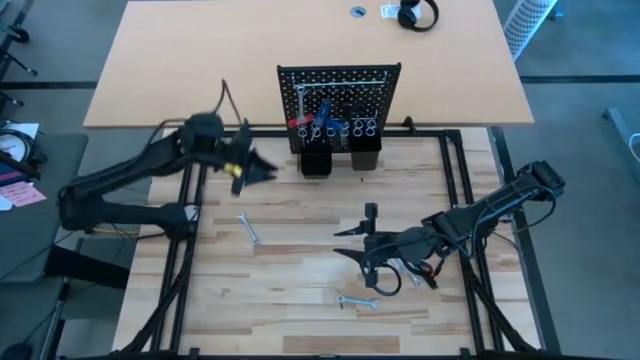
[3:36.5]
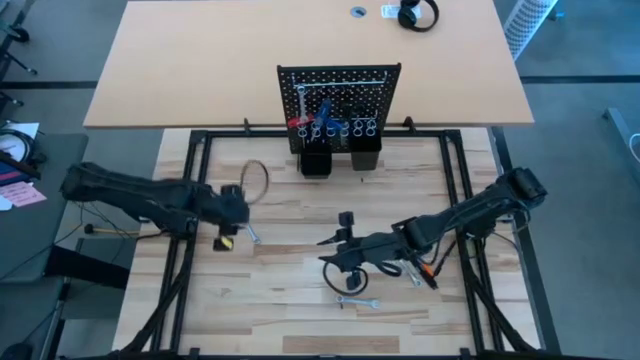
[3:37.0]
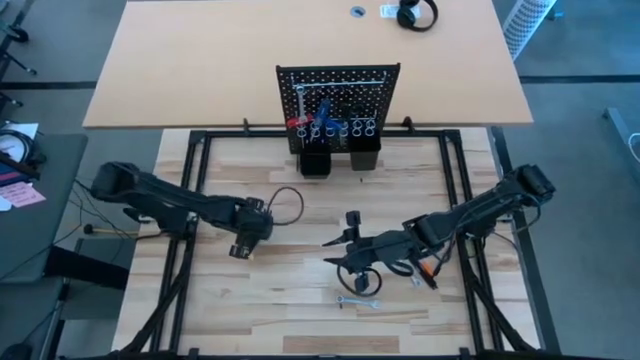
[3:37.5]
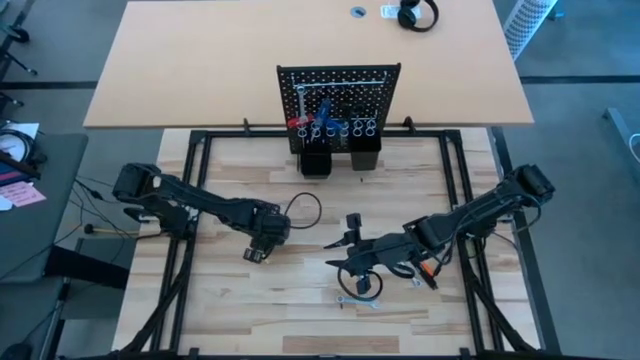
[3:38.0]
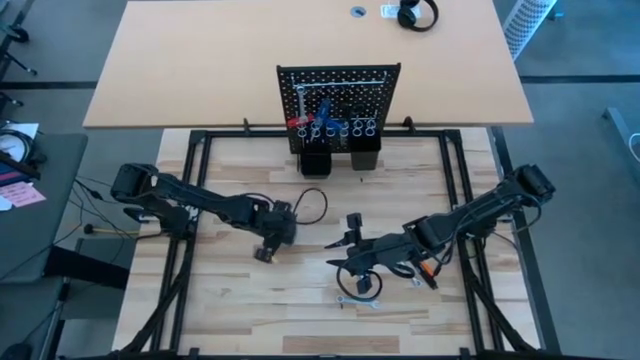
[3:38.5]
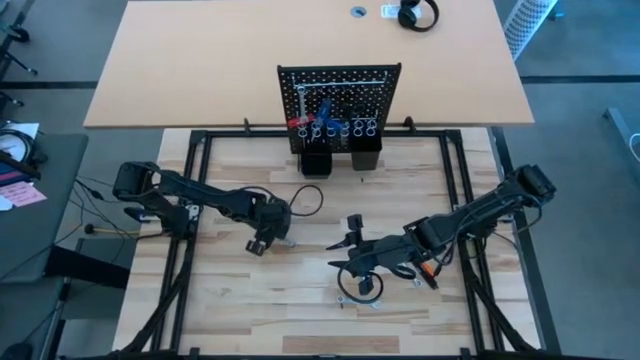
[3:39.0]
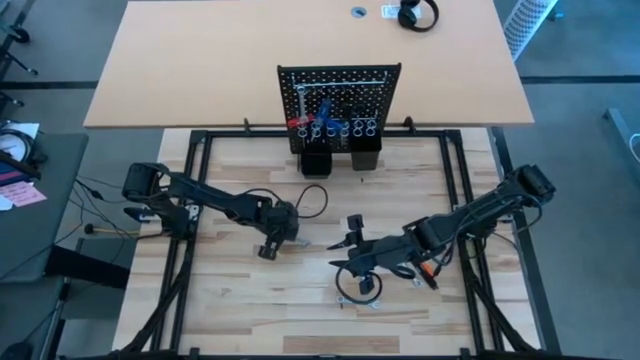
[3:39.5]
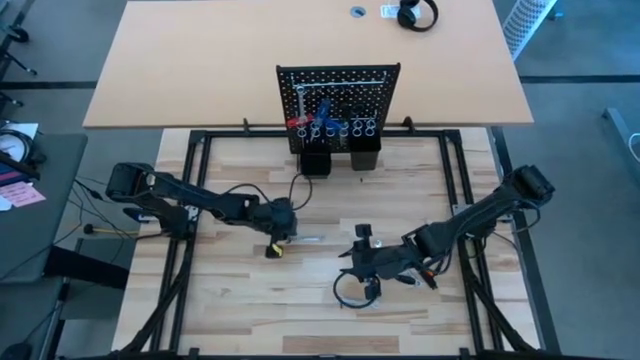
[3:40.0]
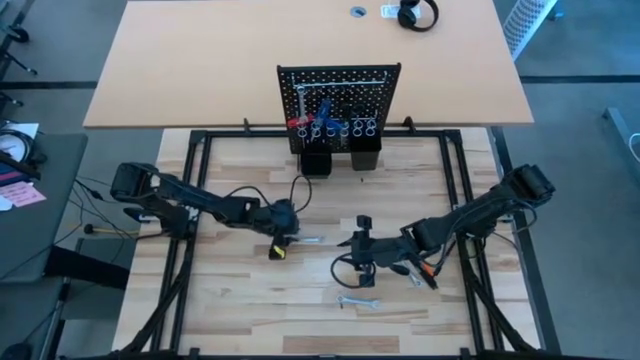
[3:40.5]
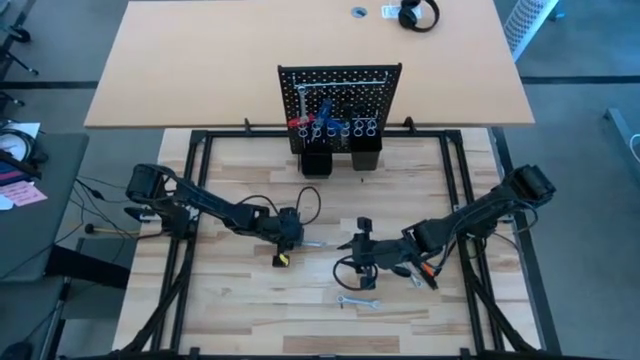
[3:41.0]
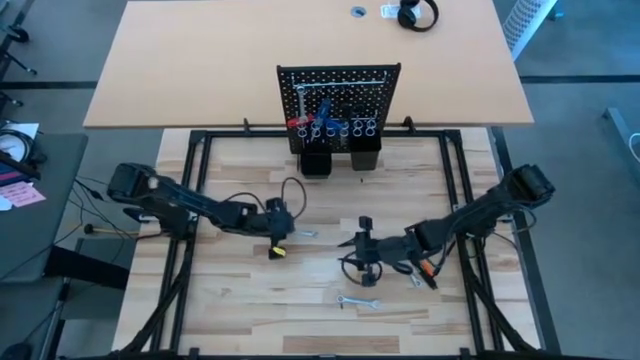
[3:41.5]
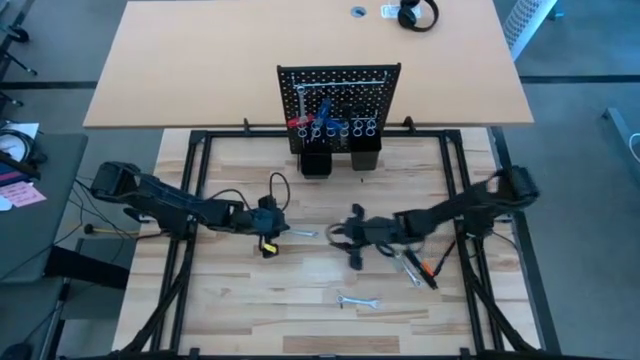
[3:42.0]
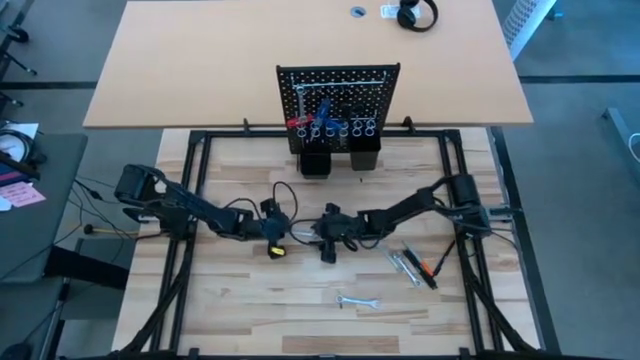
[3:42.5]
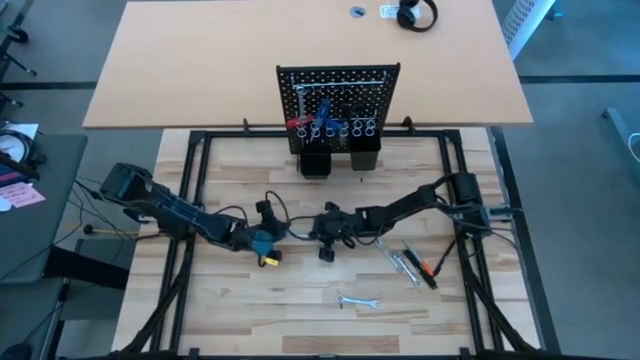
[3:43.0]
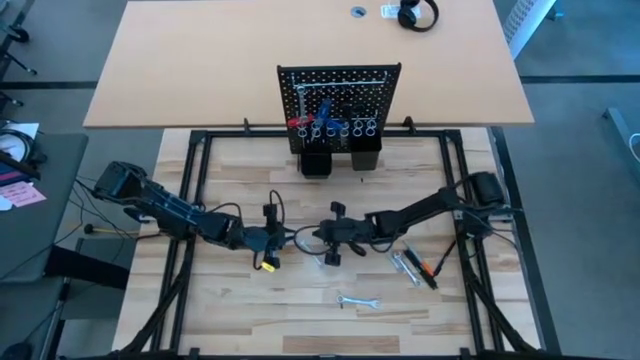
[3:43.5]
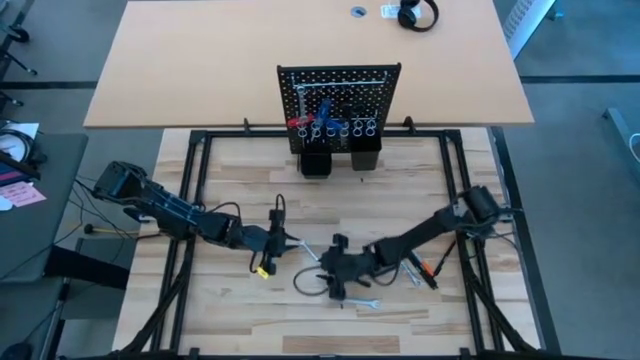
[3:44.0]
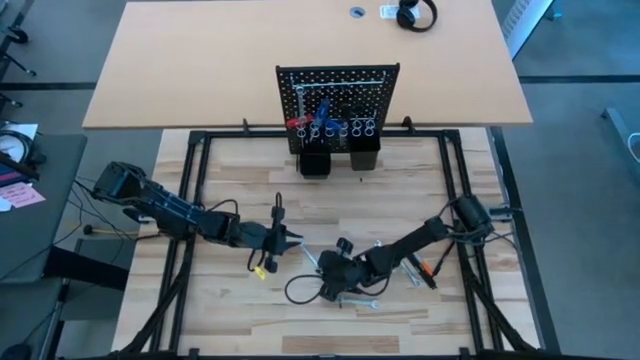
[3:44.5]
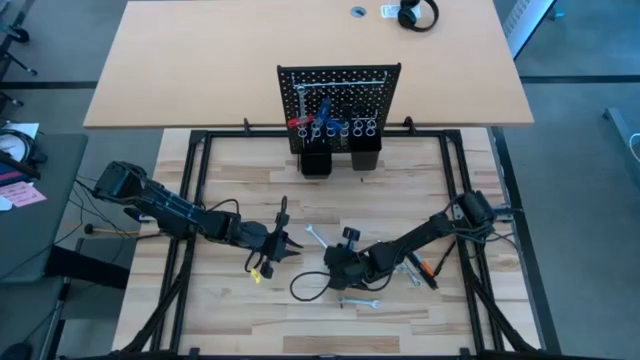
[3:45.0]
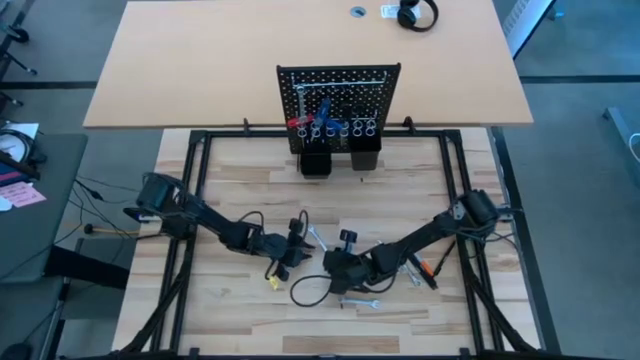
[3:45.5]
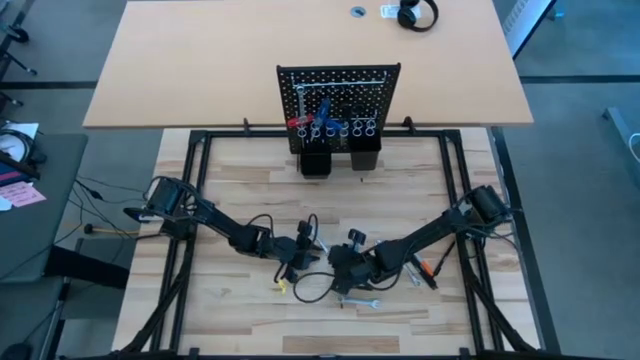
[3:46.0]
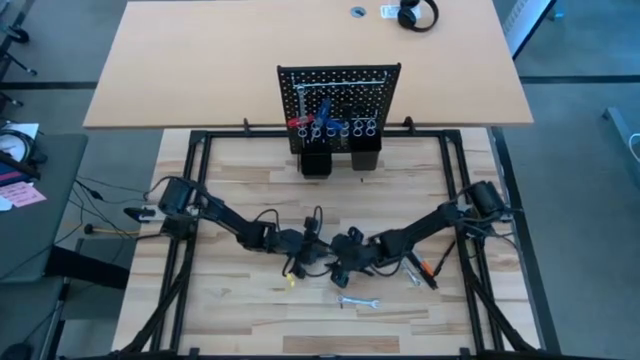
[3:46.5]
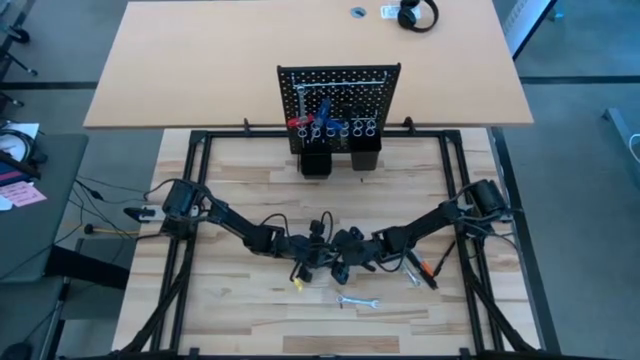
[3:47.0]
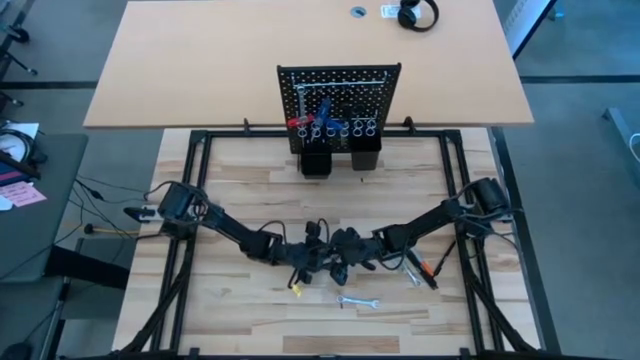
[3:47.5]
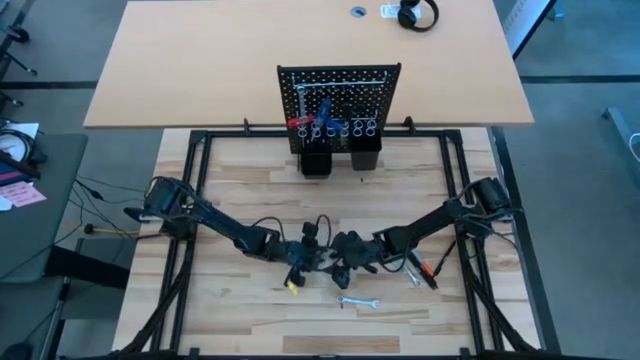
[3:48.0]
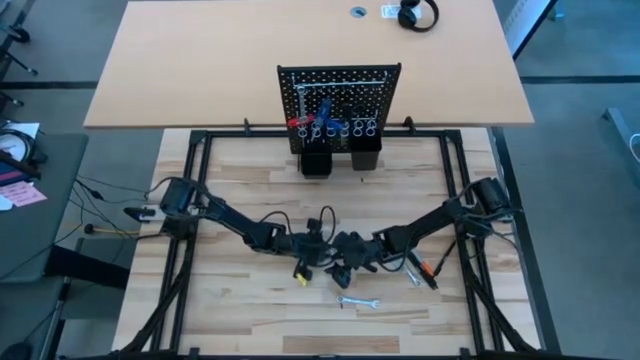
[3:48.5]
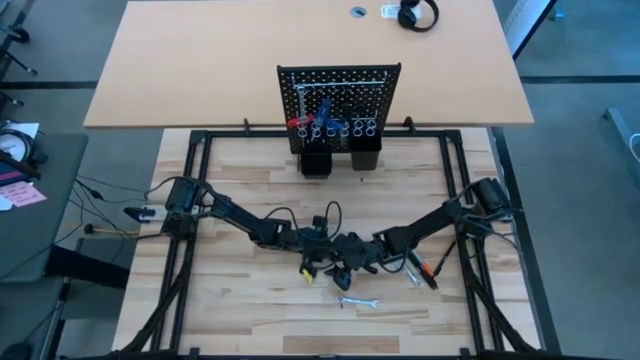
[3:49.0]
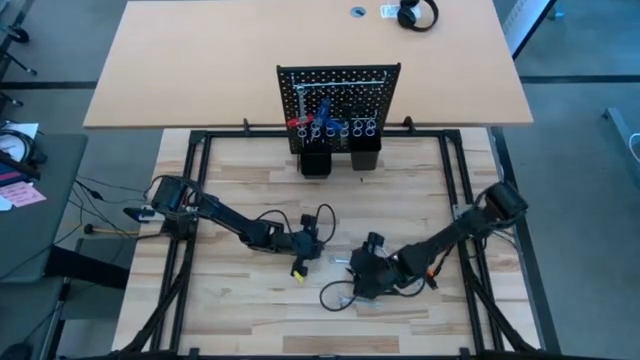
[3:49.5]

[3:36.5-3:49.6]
Task: Hang tools onto peg board
Hang the wrench on the pegboard
